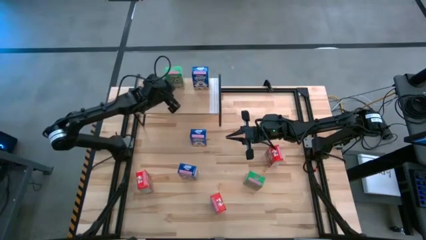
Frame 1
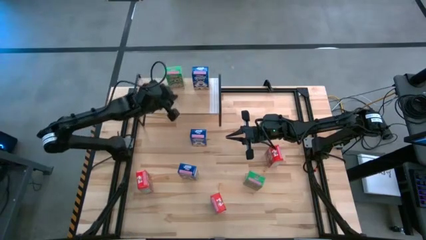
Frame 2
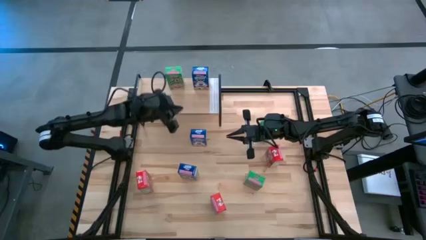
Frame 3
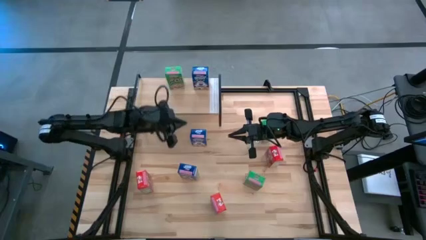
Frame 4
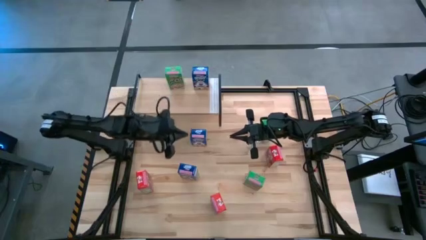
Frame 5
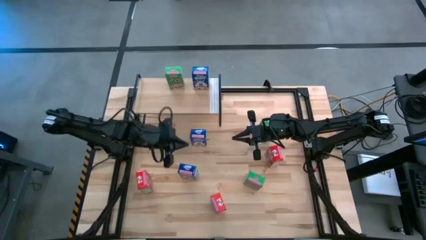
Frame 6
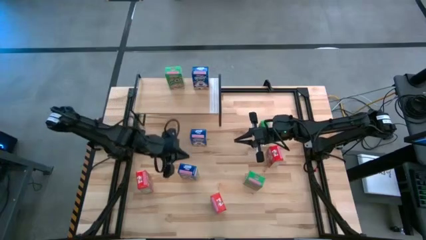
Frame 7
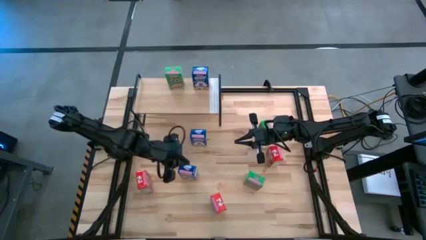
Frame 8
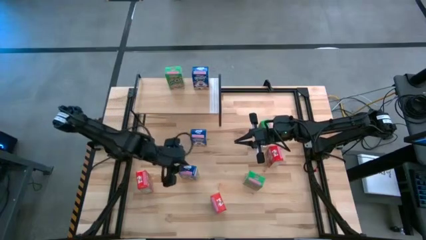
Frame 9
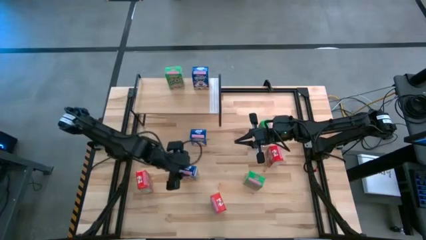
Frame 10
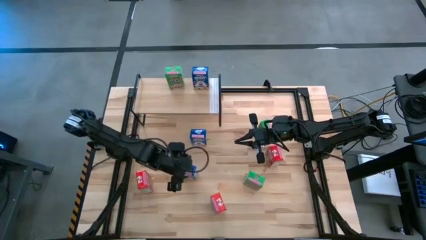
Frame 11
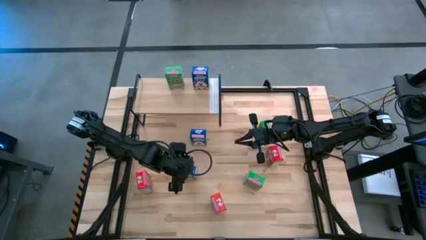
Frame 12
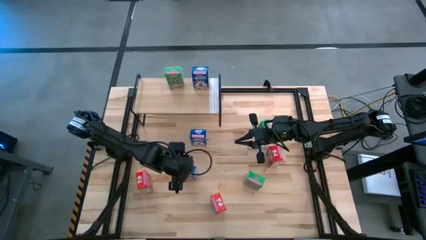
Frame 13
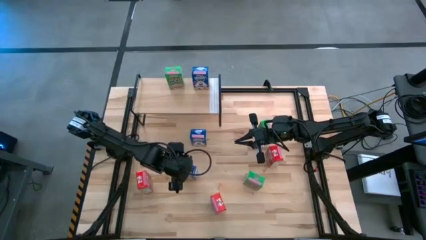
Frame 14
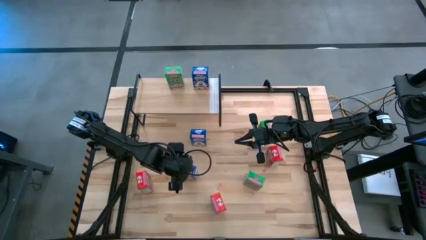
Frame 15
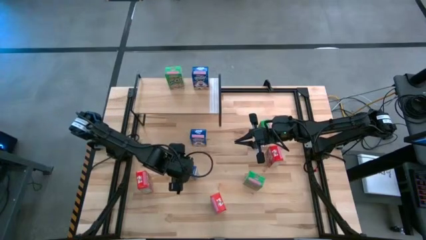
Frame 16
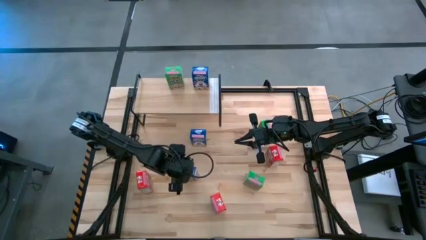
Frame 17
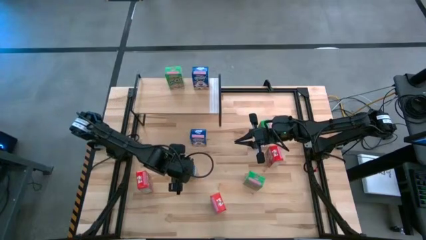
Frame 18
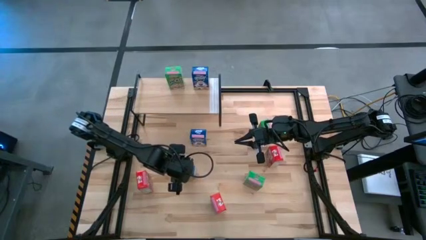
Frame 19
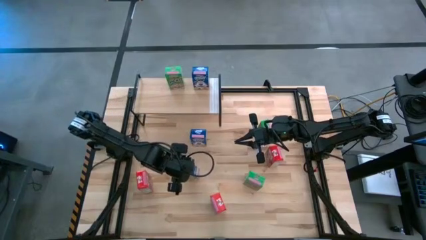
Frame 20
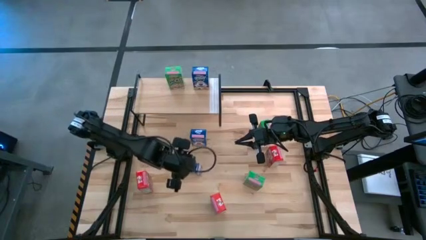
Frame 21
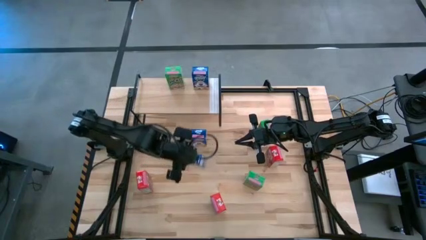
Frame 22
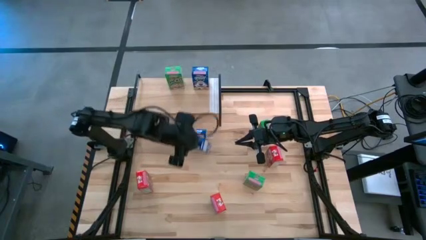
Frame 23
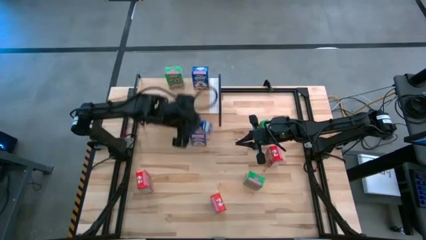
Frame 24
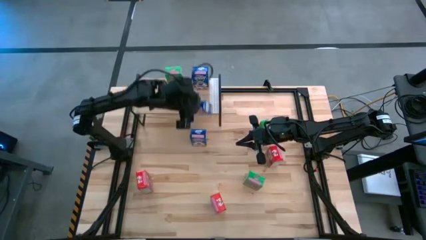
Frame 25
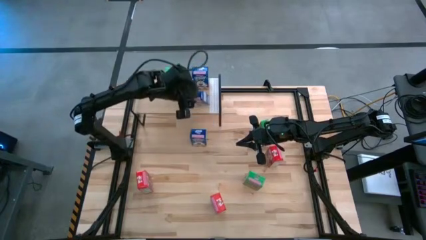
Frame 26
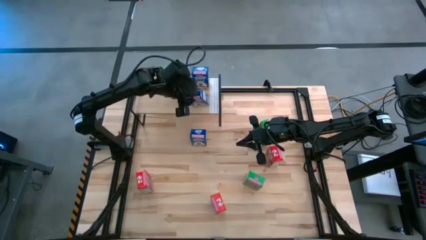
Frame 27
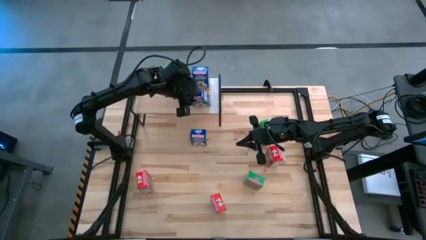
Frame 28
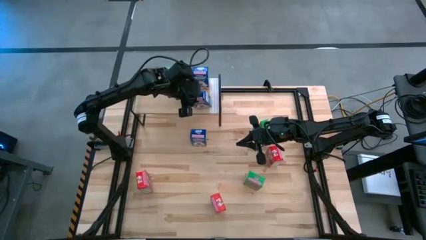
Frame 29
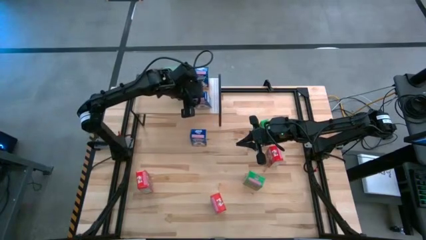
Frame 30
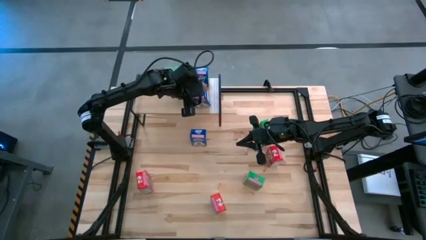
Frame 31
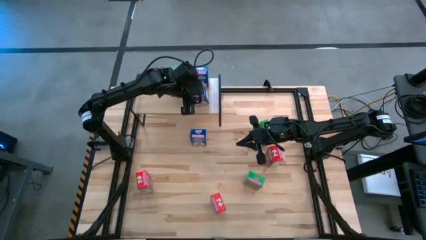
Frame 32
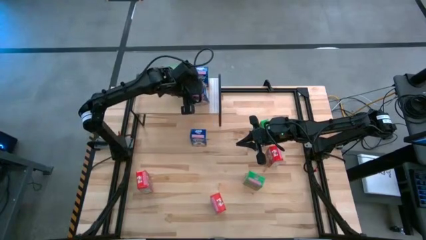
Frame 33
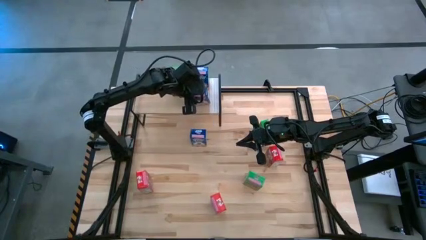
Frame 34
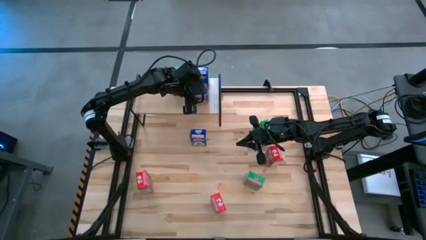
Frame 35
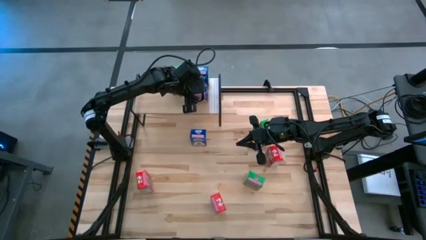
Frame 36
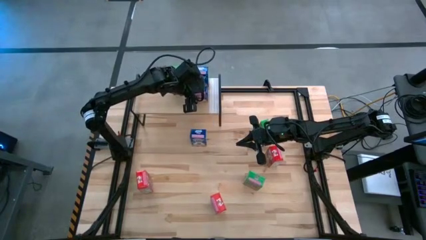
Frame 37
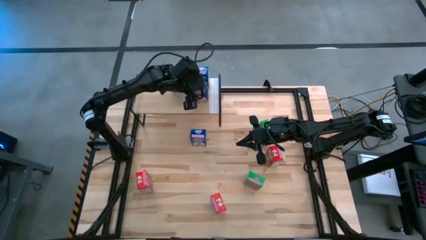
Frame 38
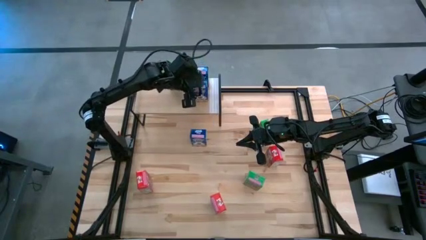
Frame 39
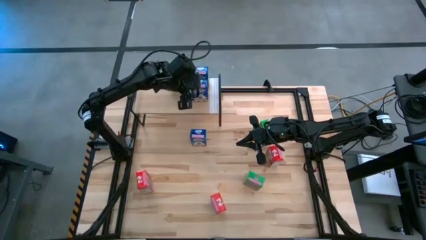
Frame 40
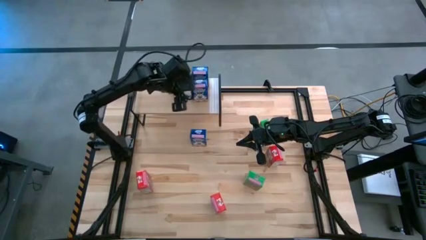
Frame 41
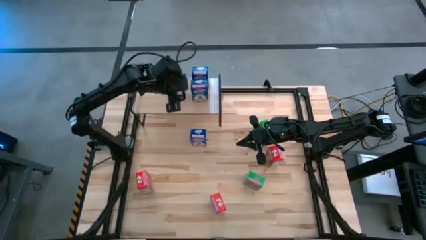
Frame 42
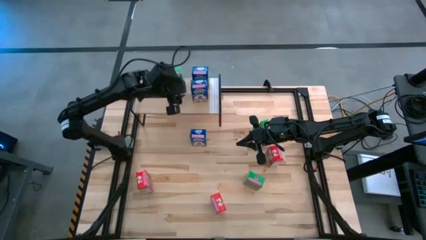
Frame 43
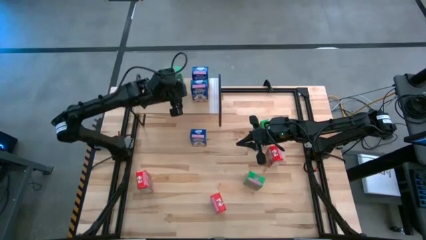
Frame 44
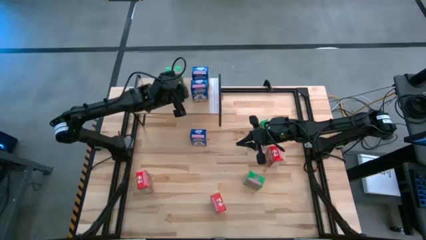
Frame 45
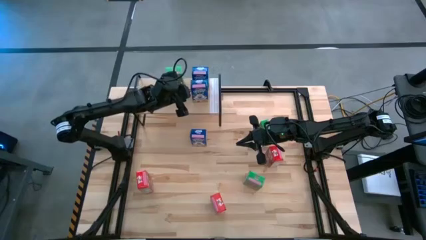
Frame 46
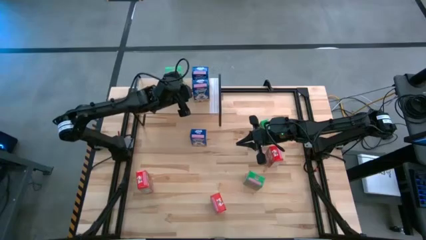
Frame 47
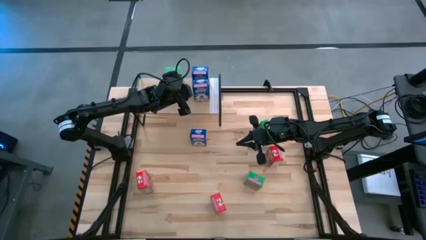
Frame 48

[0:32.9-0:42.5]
Task: Stack cereal on shelf
Put the bottom blue cereal box on the shelf aligned with the other blue cereal box

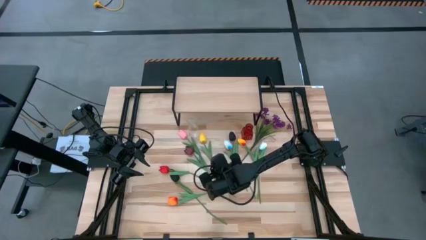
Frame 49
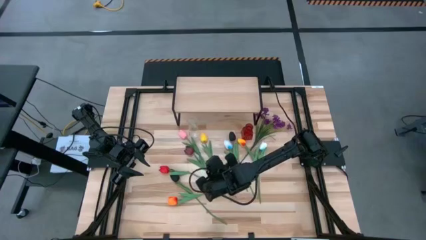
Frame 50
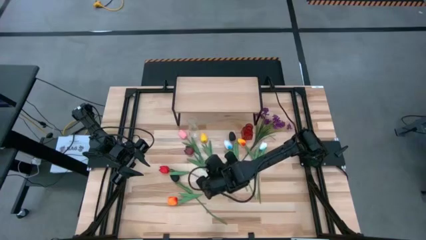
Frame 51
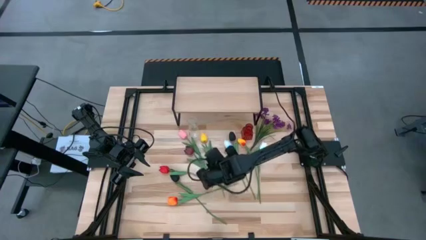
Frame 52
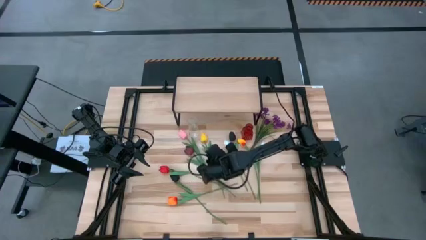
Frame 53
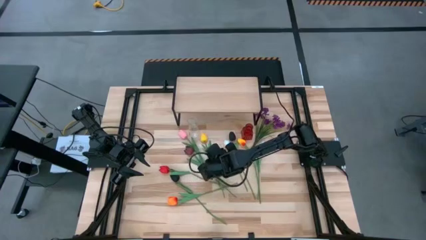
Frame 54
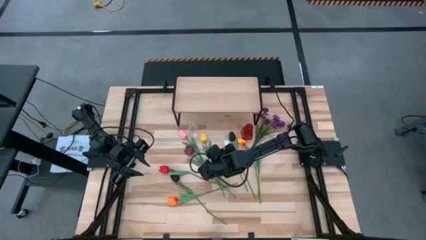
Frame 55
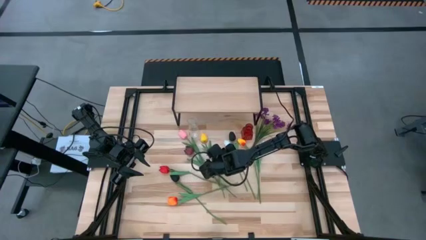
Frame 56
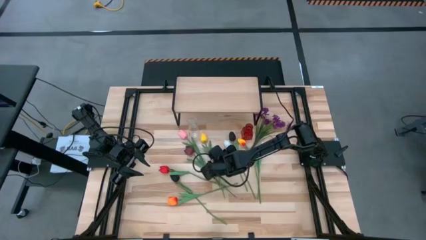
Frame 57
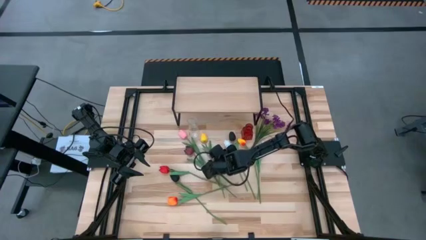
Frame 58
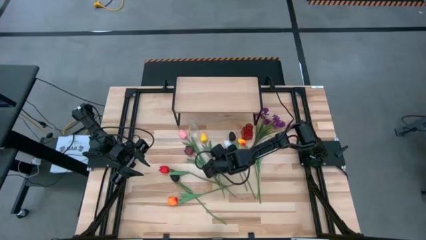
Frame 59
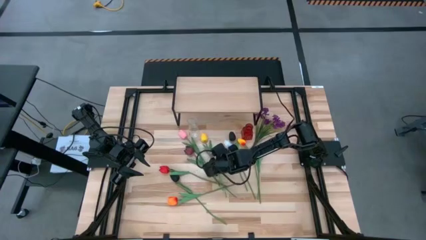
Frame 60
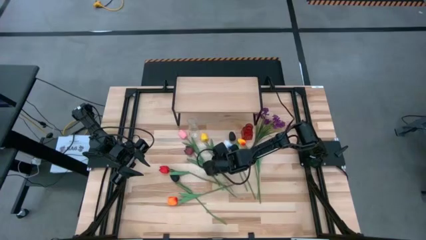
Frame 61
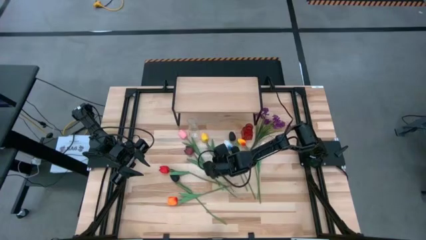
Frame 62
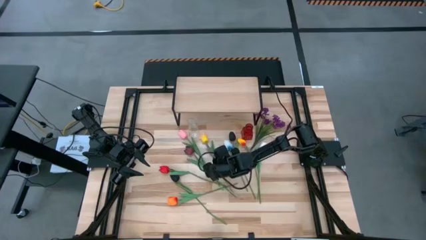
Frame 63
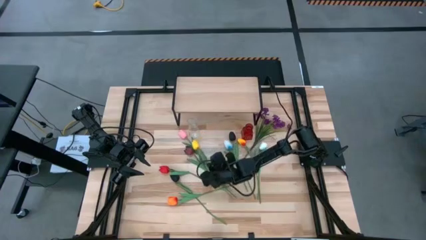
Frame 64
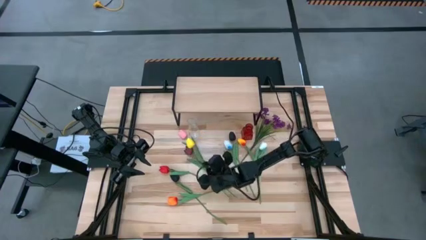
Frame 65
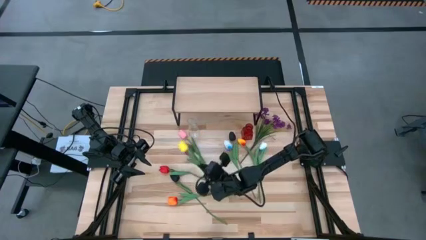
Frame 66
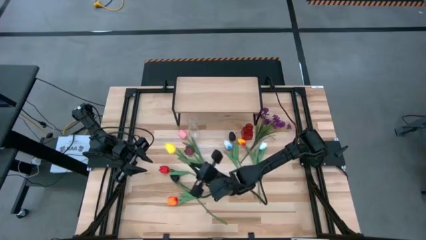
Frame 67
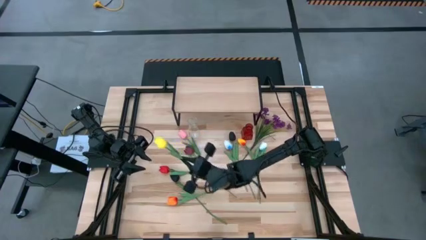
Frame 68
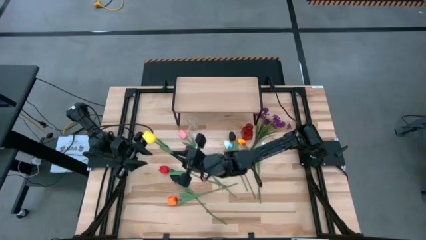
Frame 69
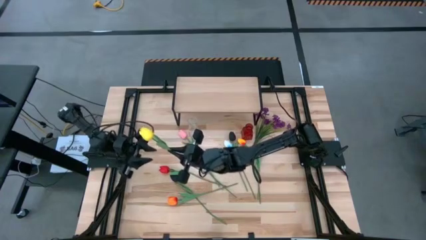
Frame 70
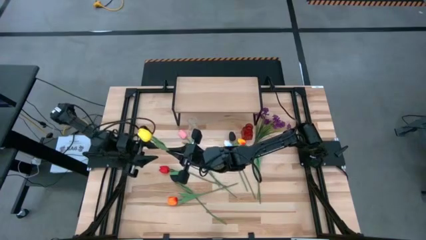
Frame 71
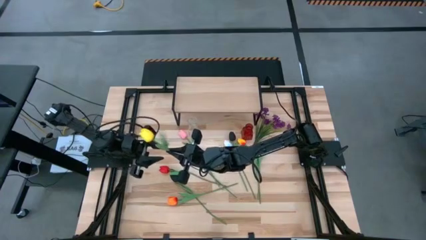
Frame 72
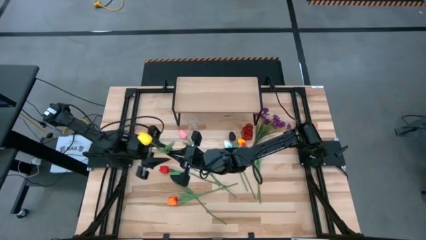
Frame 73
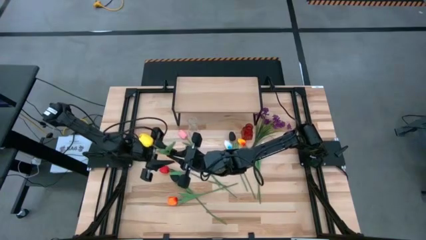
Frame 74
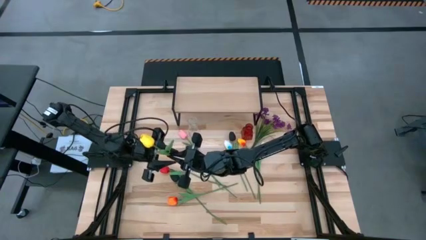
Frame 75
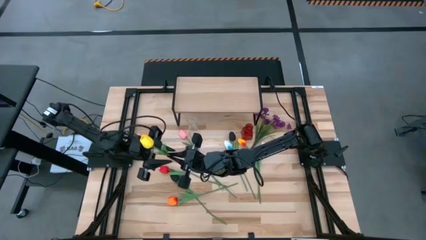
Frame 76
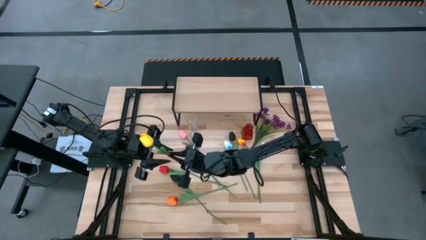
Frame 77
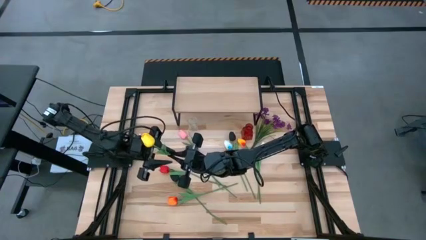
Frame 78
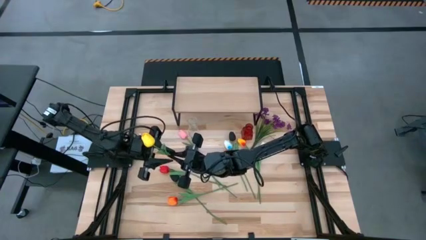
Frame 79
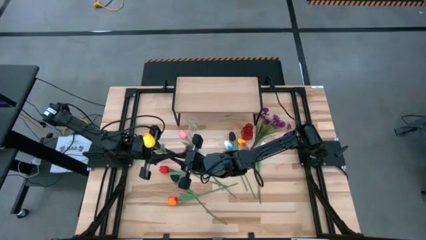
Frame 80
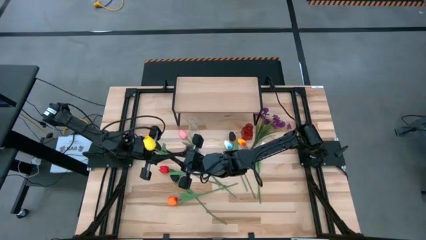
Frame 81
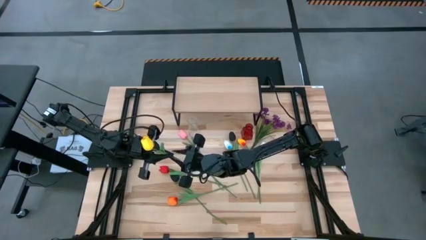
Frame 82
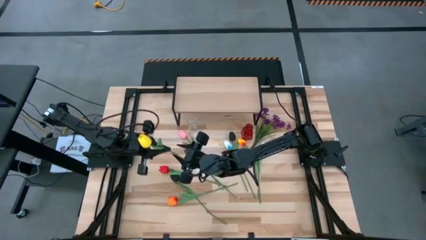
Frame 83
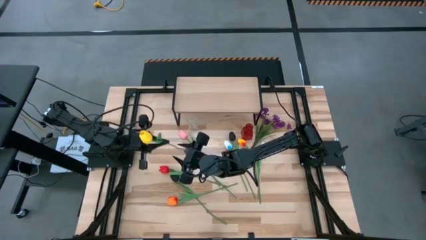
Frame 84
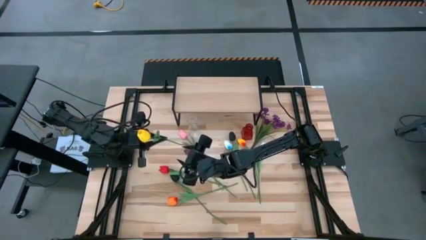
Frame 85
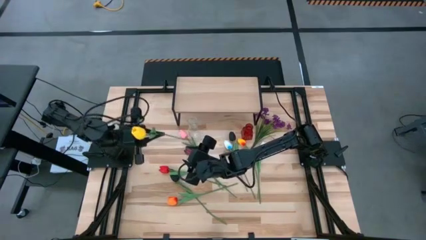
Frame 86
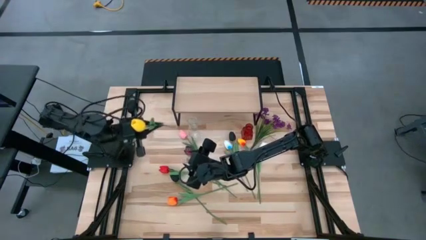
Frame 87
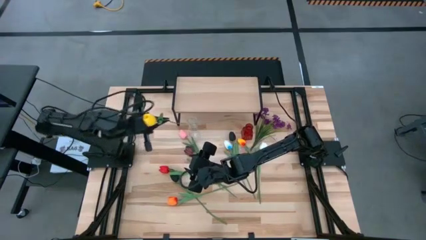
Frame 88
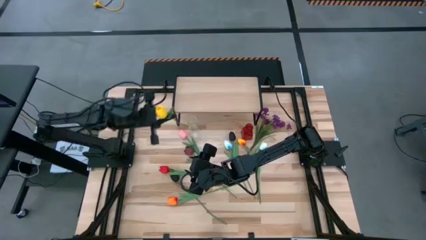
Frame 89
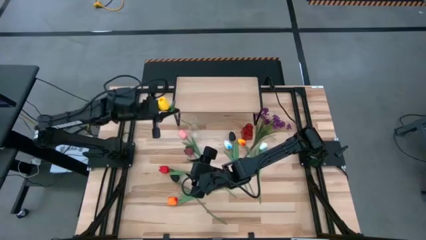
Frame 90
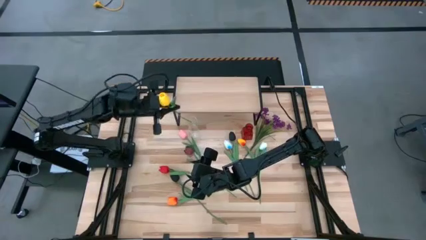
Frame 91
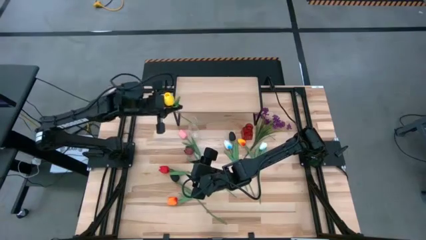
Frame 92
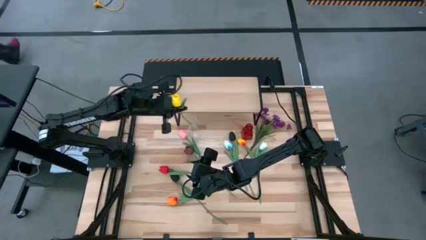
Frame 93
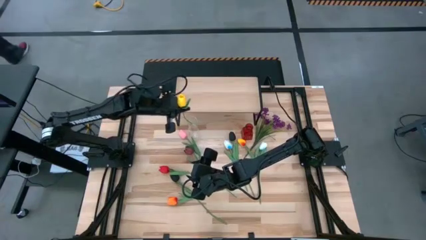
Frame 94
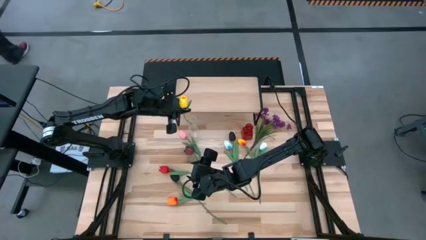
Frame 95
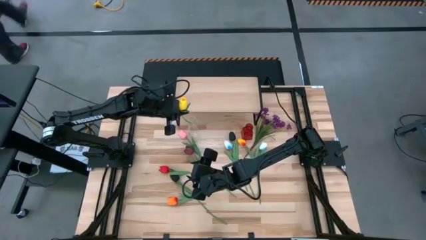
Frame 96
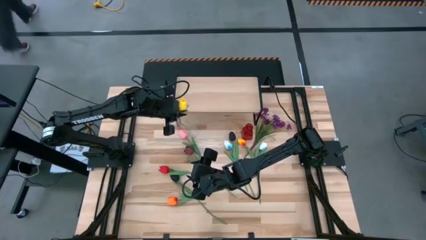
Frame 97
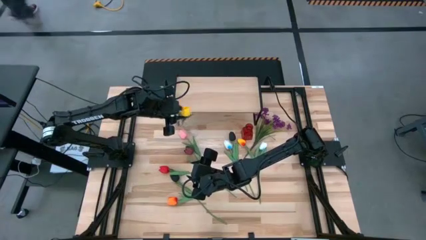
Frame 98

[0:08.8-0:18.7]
Task: Pick and place flowers into a vace then onto a shelf
Put the left yellow flower into the transparent vase
